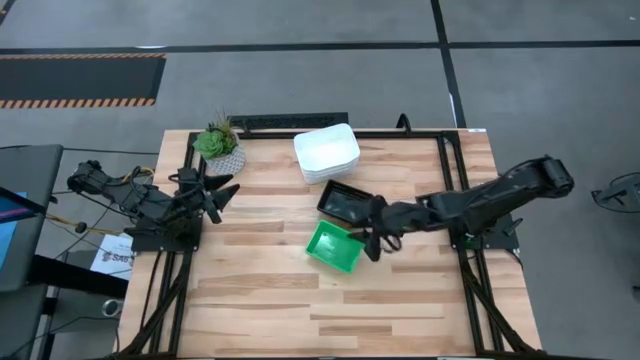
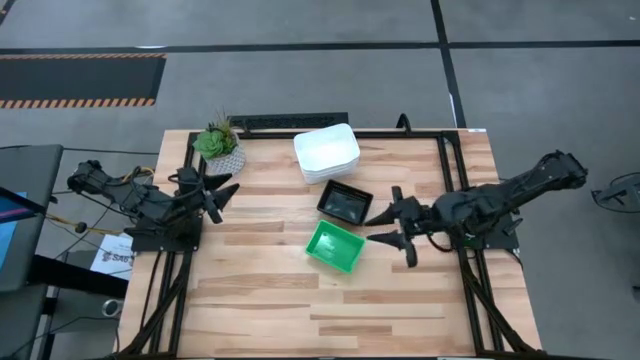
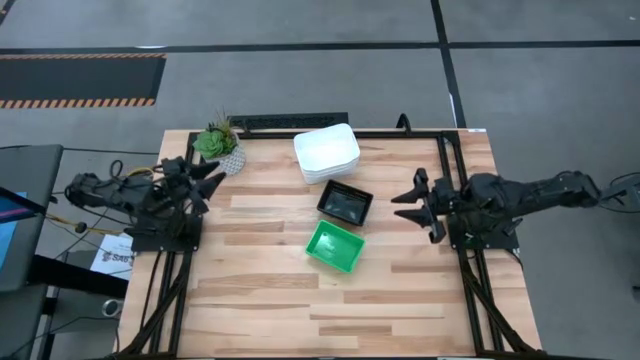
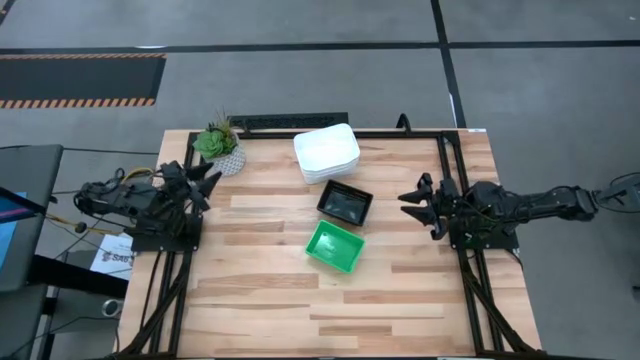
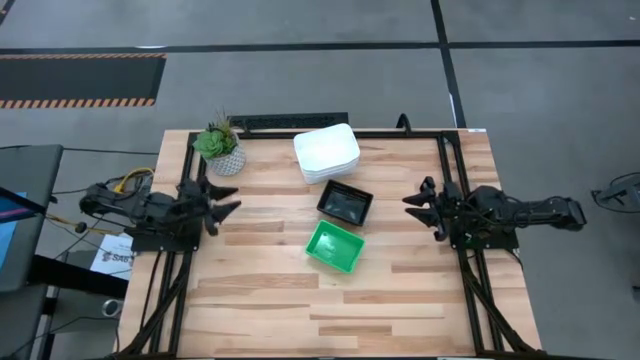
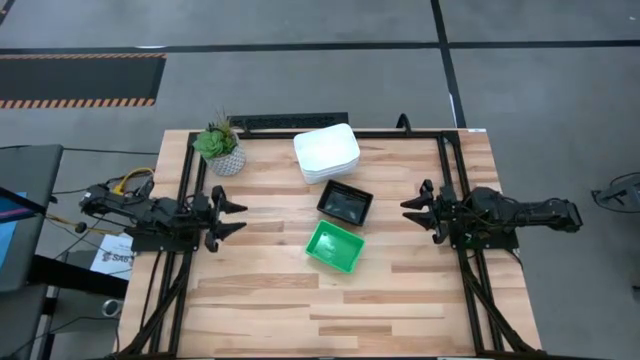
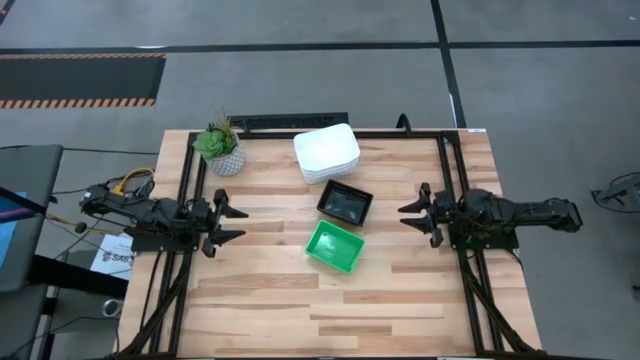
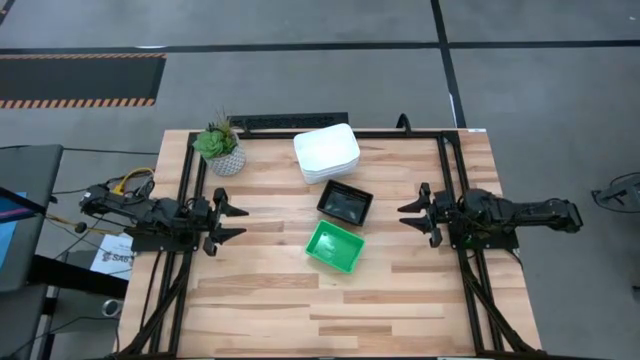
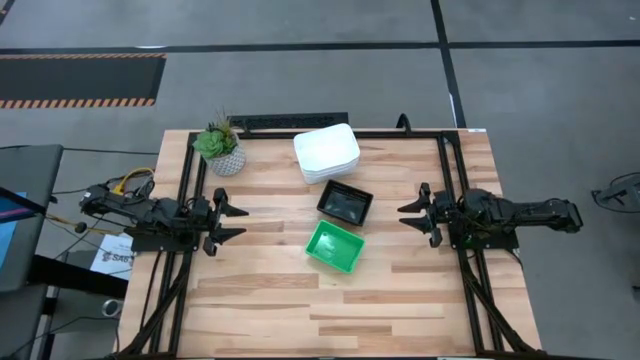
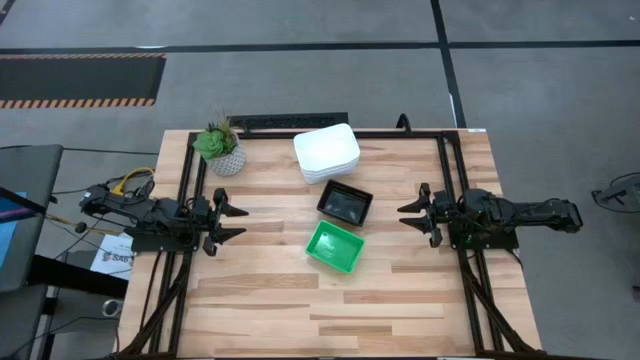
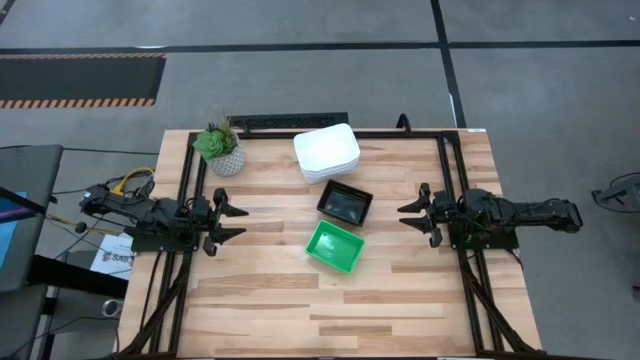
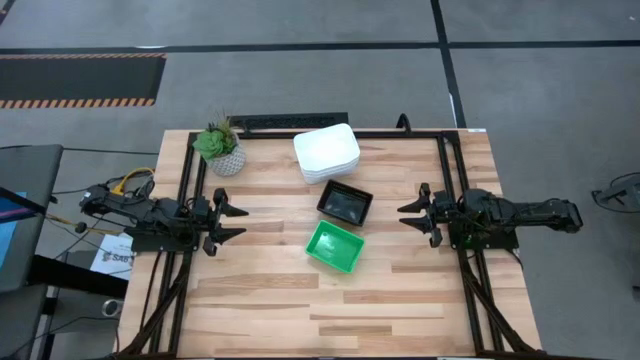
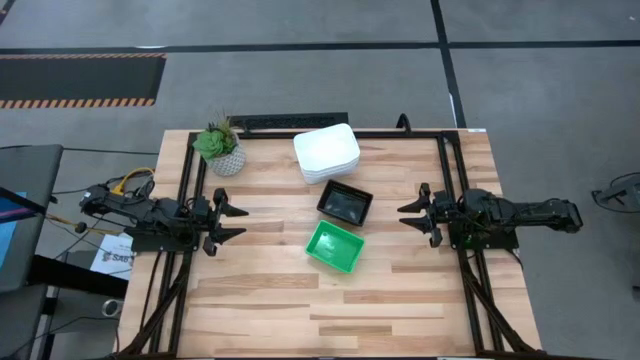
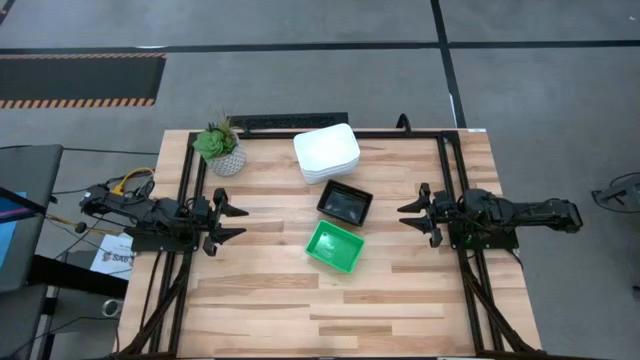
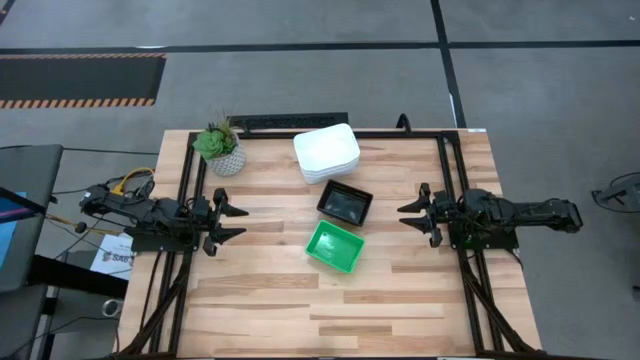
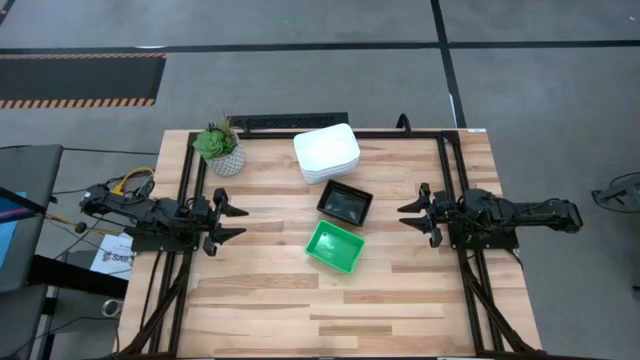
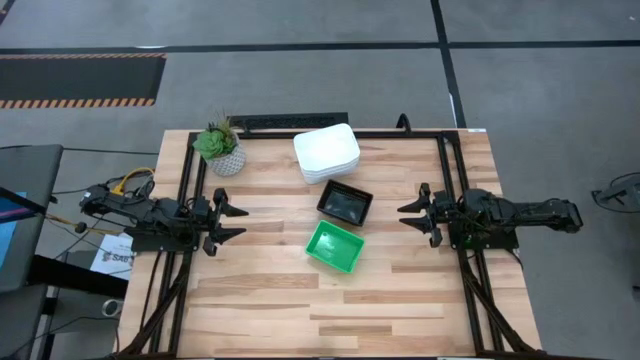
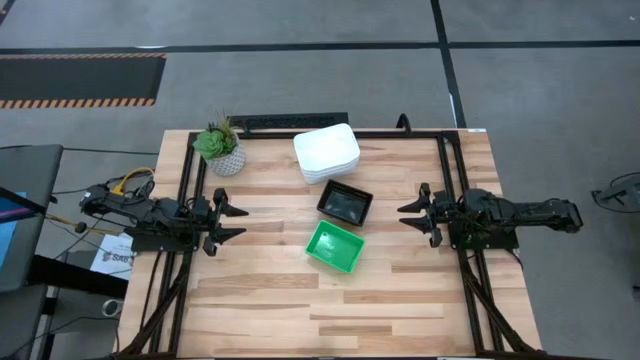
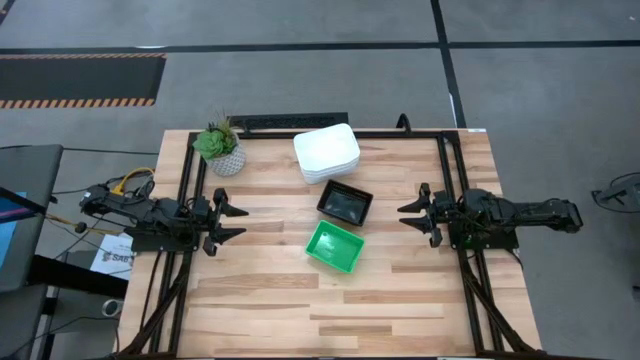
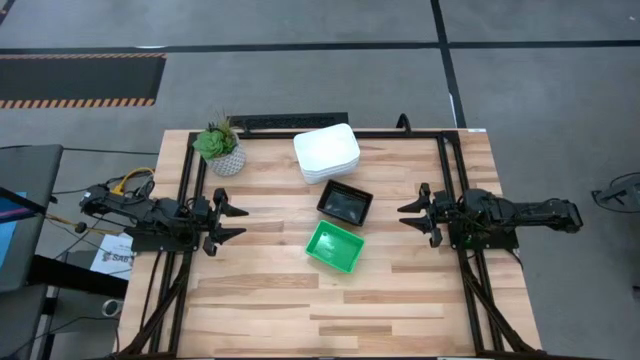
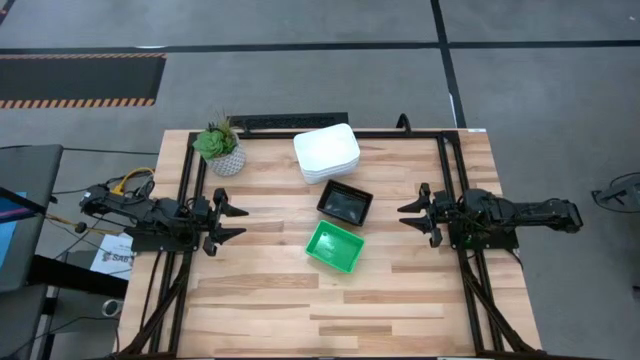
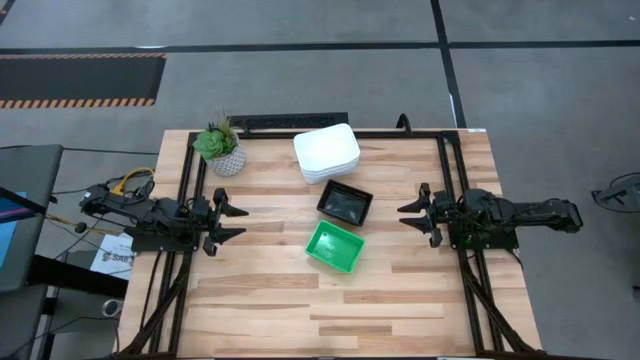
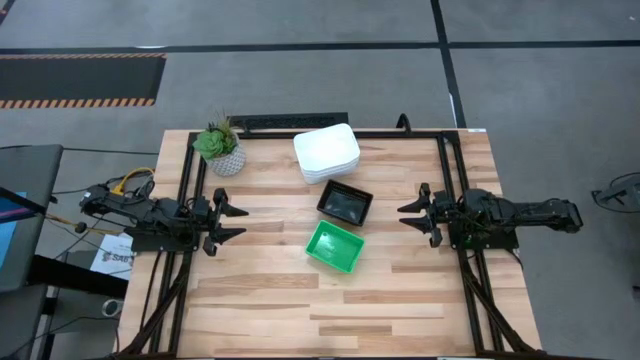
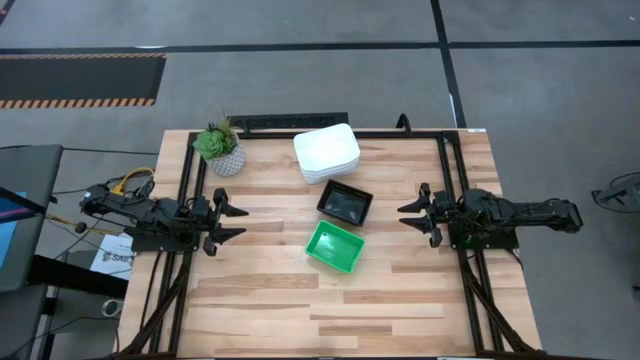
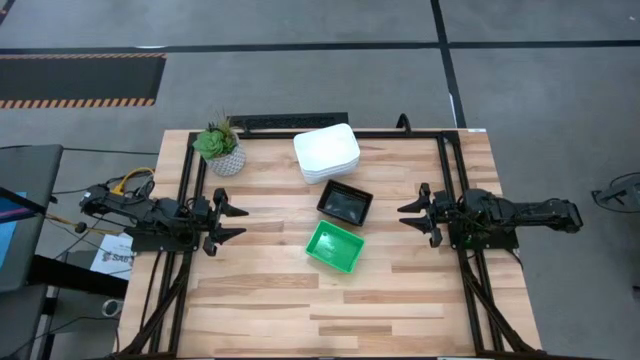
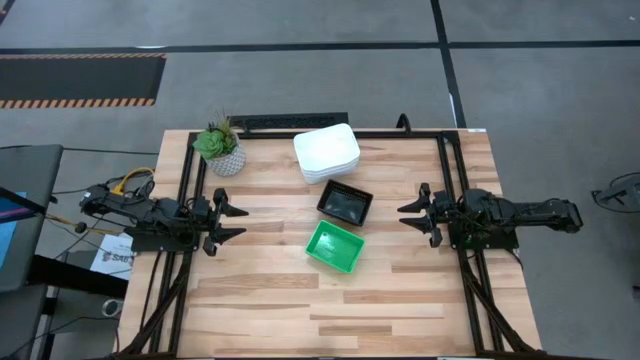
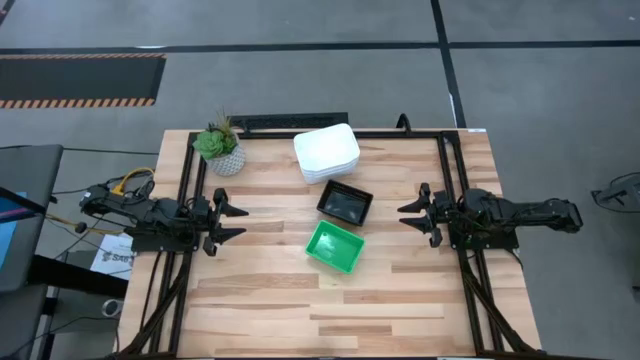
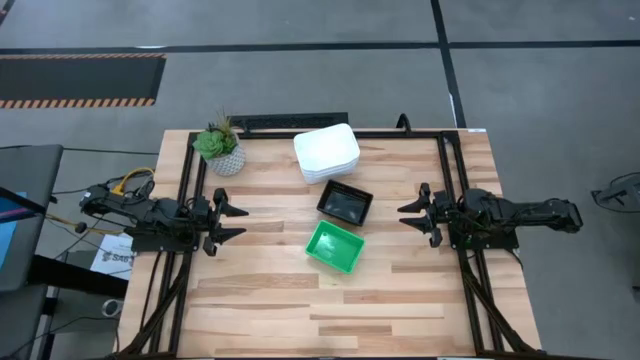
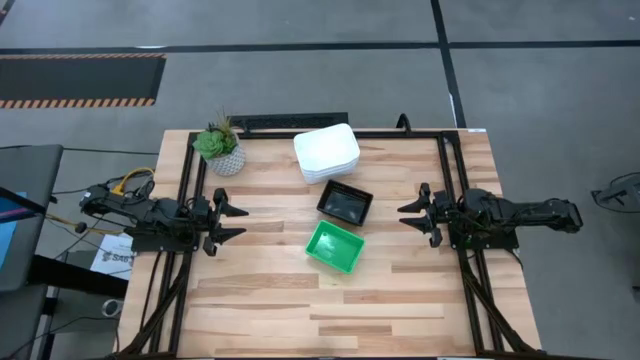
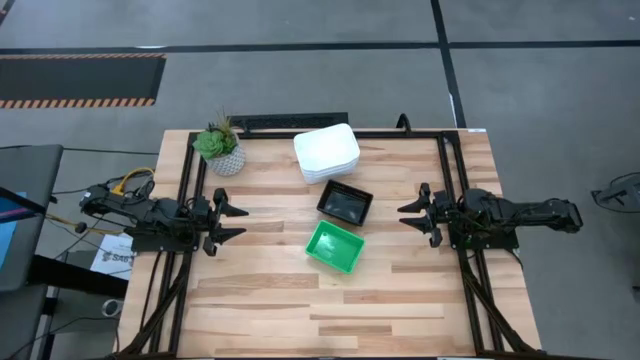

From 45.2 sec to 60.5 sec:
Return to Home Position

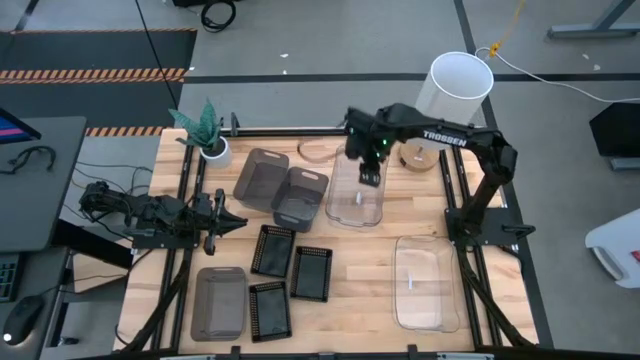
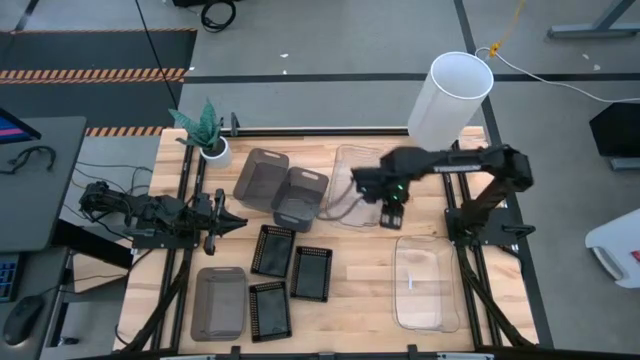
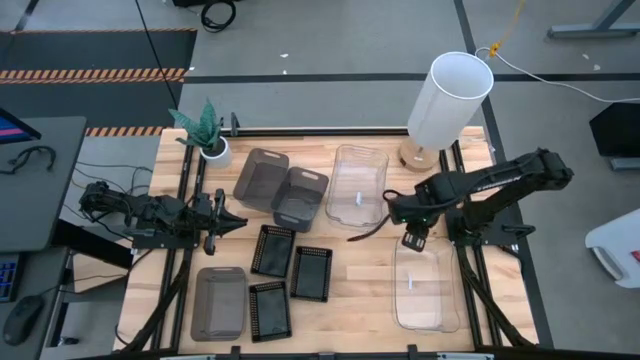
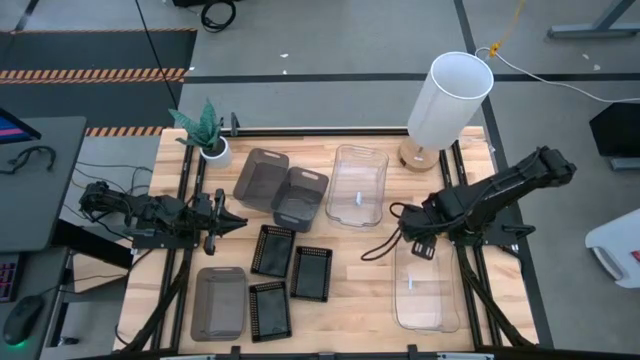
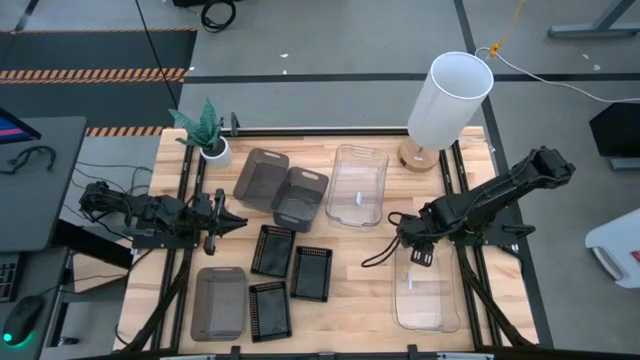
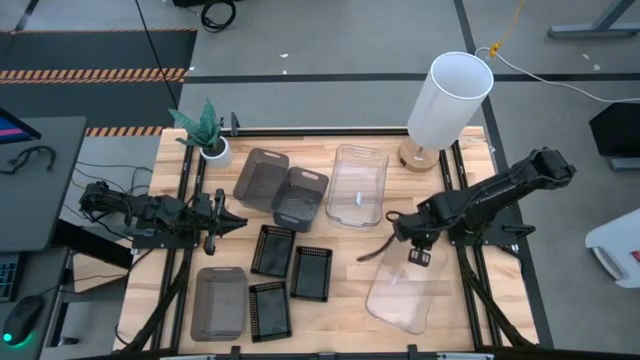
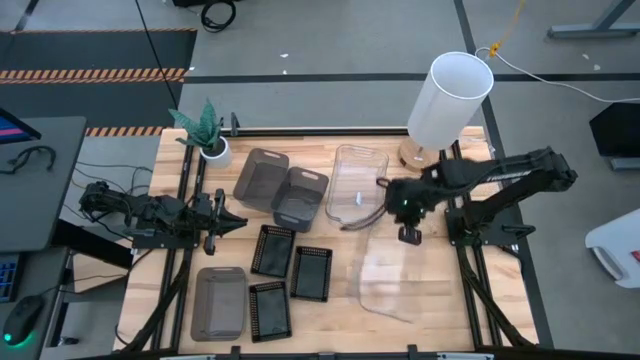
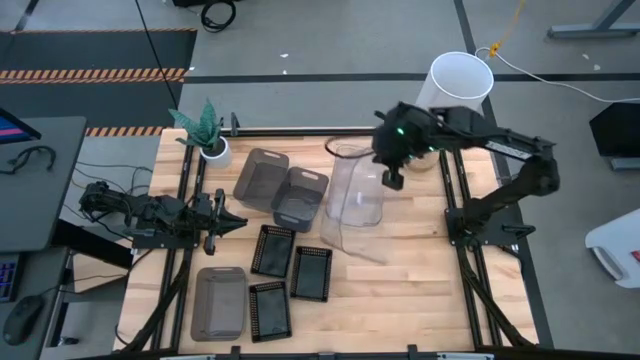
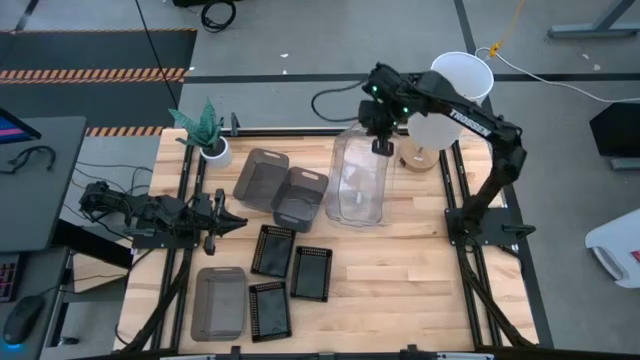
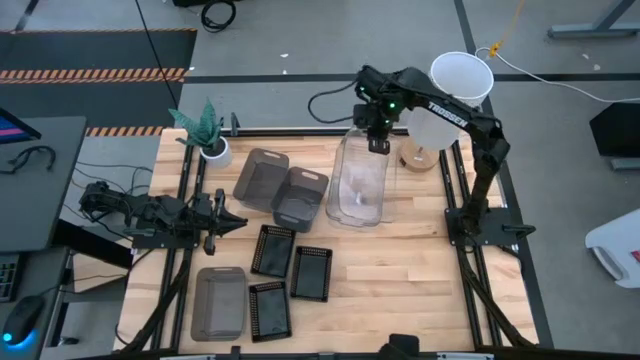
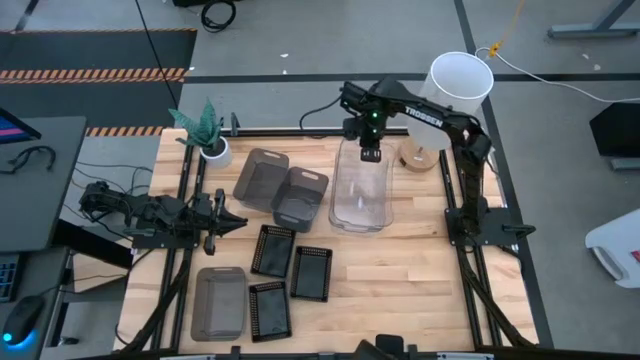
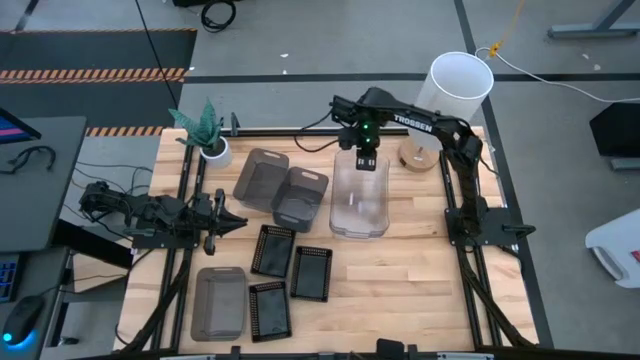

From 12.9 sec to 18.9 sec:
Stack the bottom transparent bin on the transparent bin
